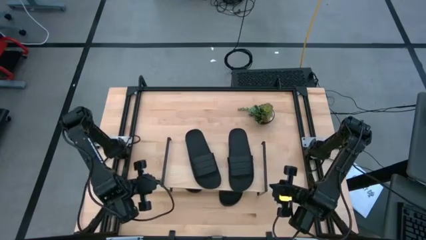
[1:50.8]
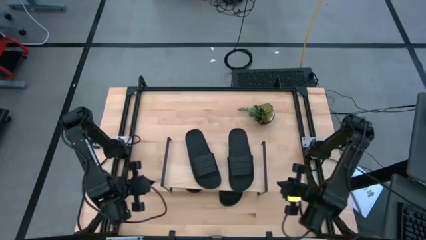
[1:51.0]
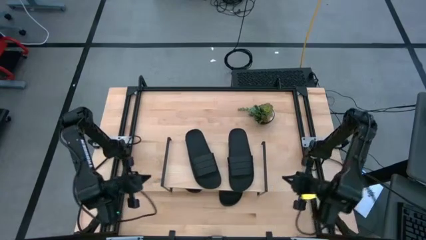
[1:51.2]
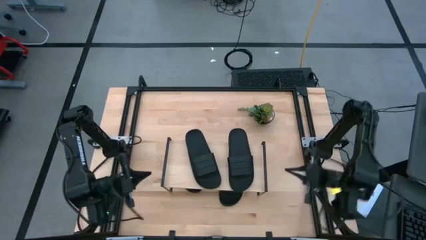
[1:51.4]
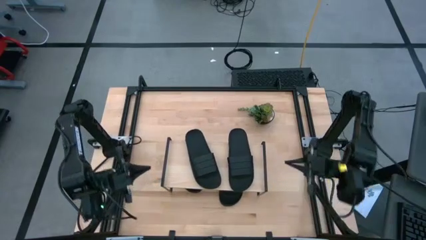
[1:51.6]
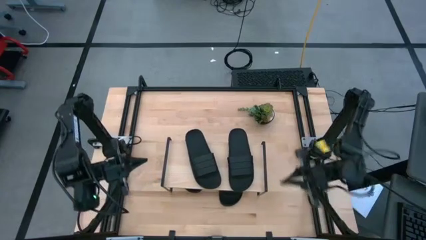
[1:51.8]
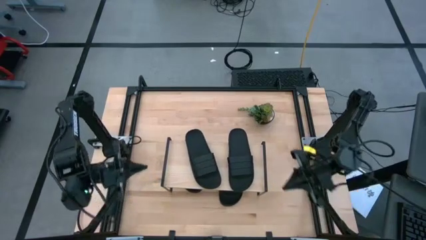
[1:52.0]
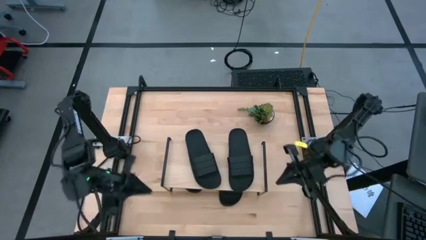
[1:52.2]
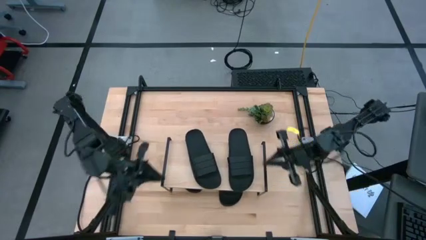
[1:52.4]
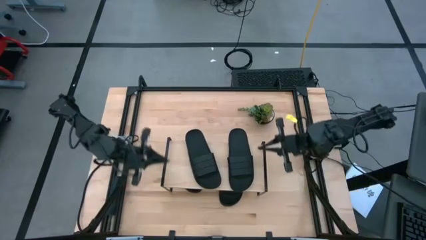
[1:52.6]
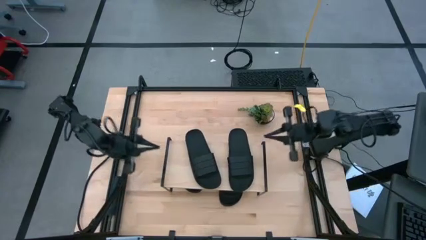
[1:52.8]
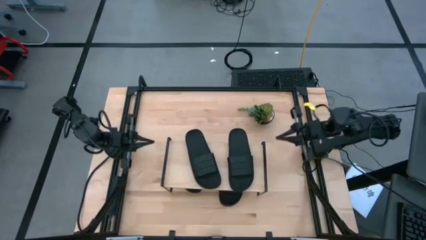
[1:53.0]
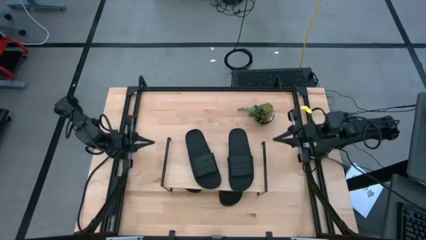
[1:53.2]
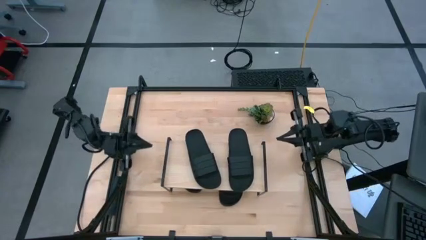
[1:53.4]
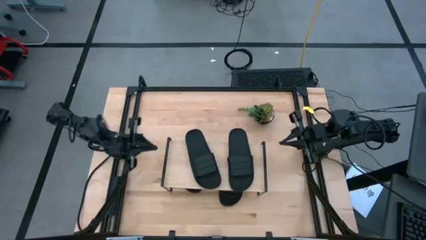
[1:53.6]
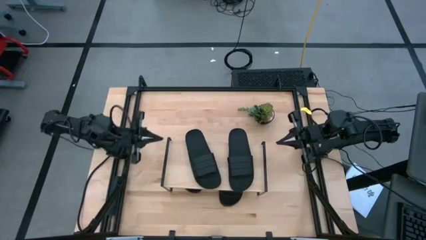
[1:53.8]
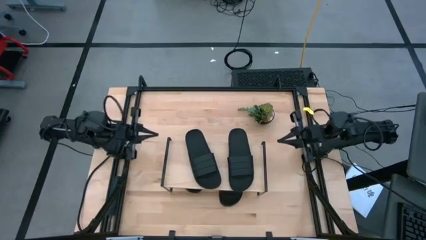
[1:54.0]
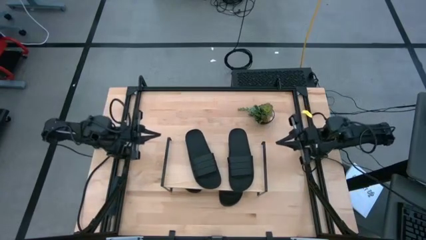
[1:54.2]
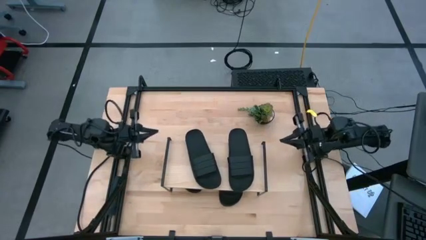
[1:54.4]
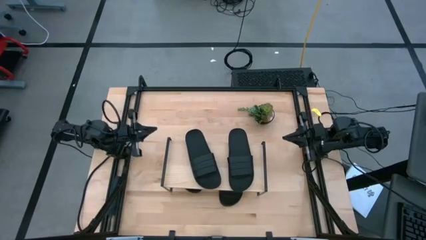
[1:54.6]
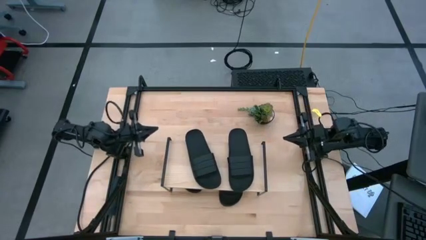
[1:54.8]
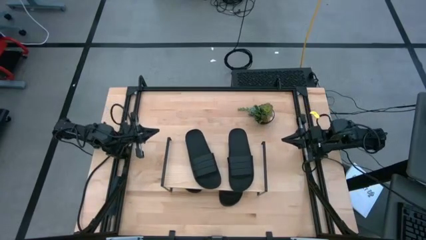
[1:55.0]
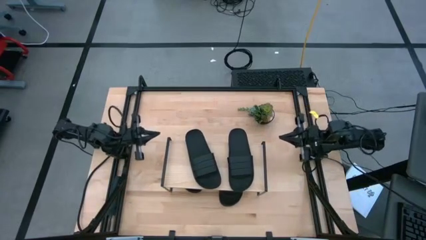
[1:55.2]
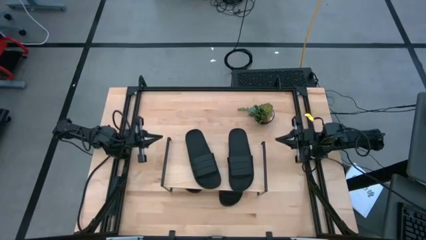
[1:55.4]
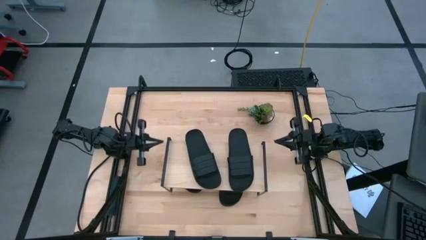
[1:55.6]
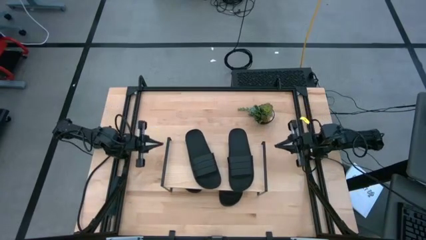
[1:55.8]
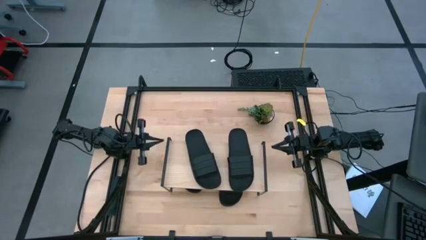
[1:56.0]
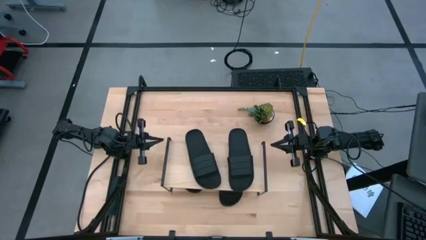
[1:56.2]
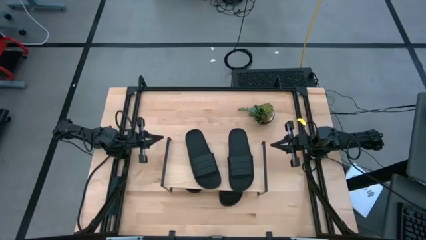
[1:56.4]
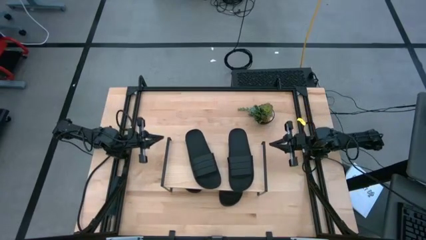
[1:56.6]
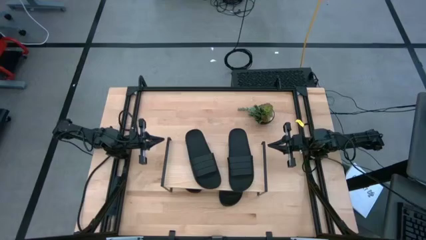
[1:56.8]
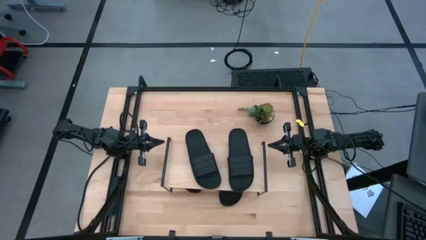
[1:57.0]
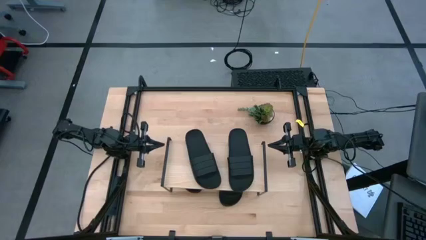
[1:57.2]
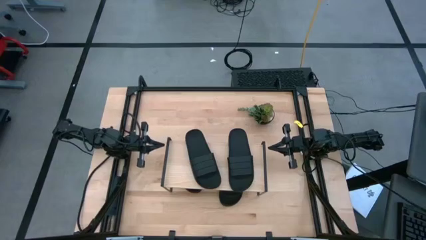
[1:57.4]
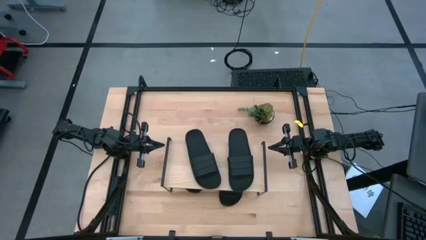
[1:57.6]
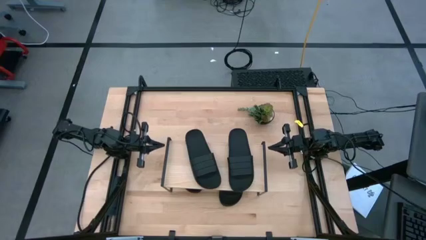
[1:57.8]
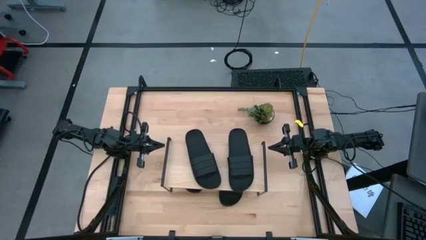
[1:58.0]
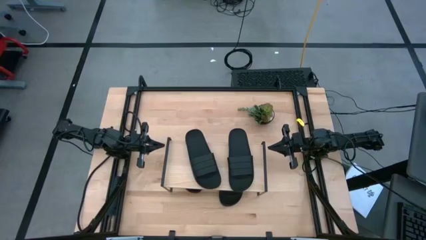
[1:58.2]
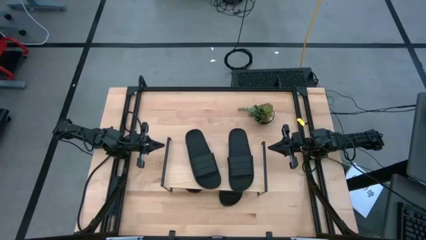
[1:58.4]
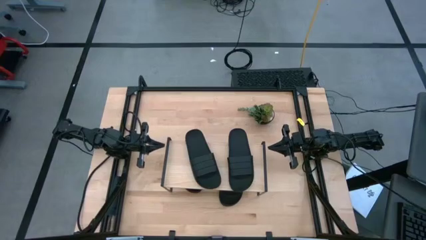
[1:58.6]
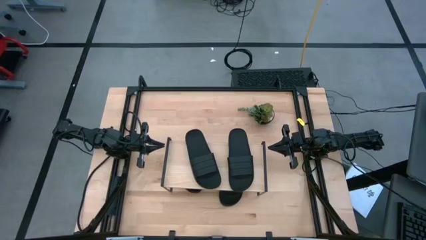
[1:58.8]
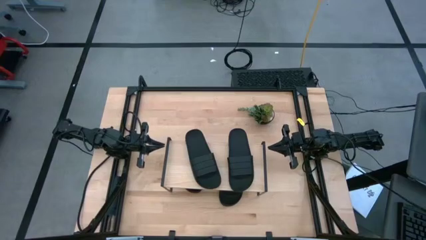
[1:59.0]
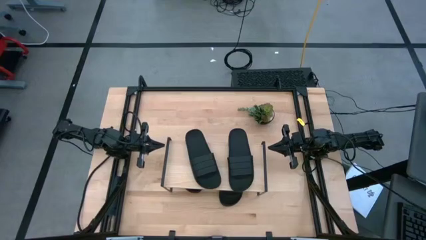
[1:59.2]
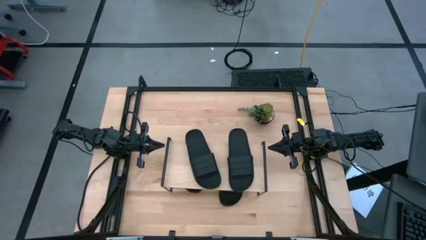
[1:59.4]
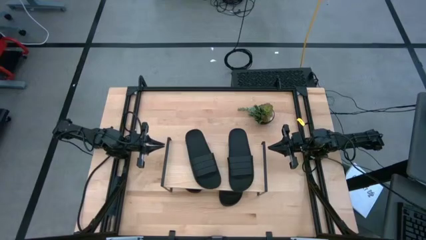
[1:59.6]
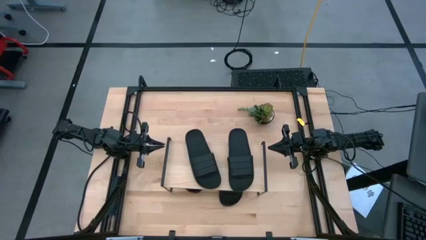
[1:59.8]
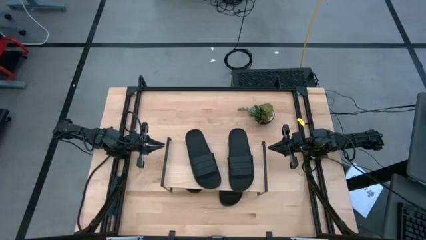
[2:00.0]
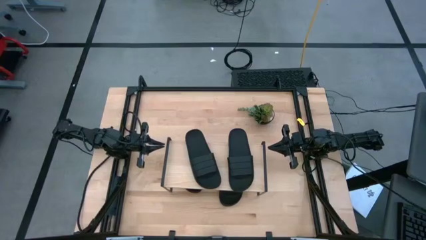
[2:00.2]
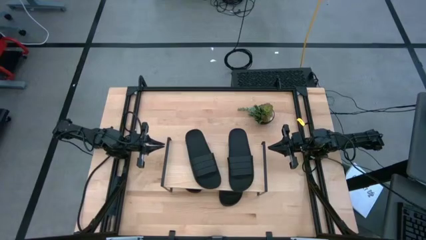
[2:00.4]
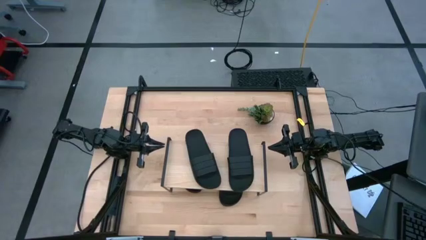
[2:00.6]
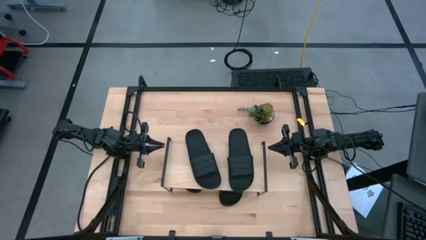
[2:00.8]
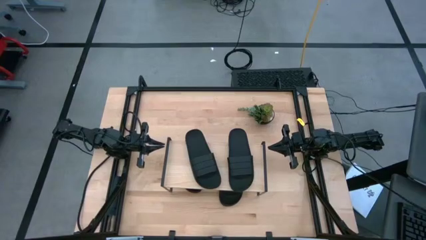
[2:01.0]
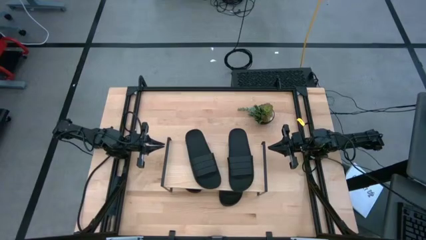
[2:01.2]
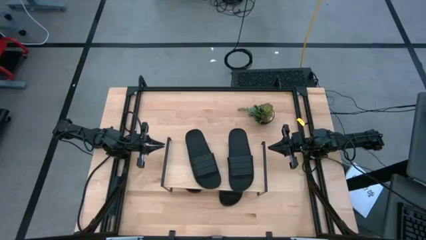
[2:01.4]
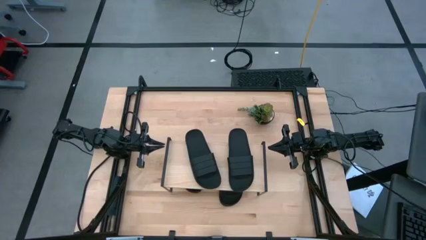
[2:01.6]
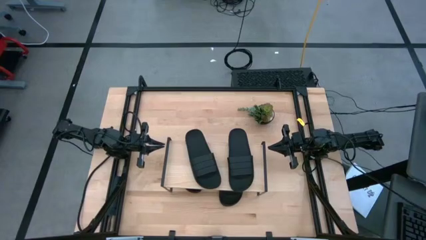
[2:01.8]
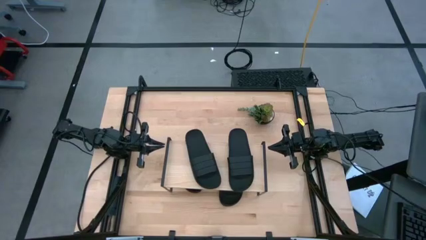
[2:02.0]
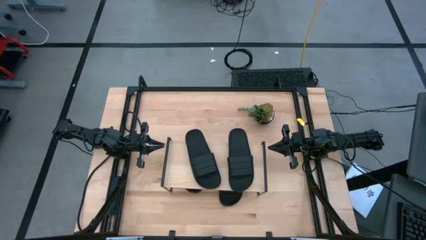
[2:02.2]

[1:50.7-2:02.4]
Task: Pick and place slides into the shelf
Return to Home Position

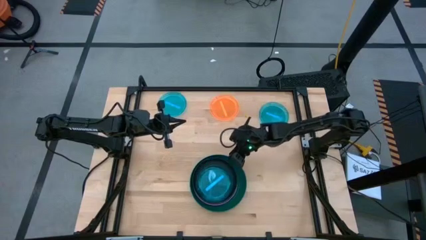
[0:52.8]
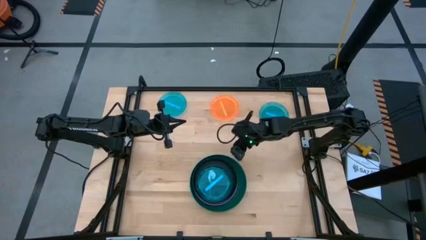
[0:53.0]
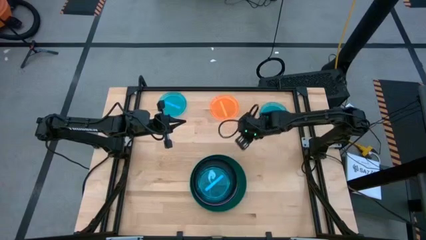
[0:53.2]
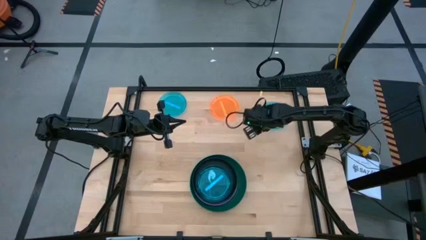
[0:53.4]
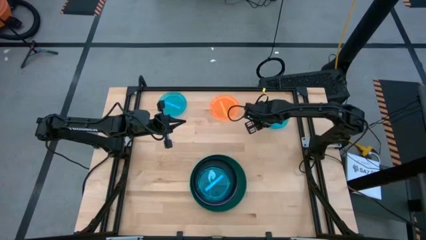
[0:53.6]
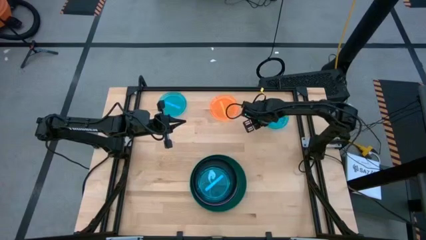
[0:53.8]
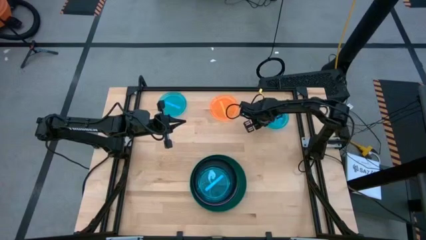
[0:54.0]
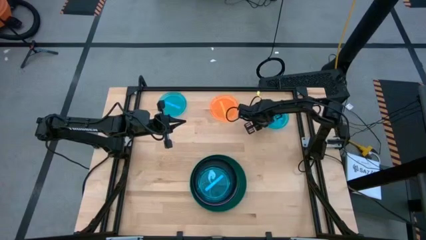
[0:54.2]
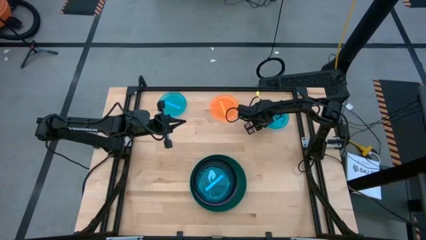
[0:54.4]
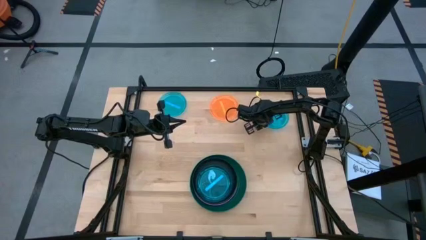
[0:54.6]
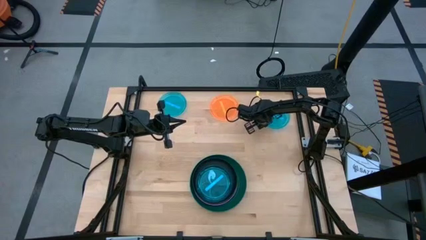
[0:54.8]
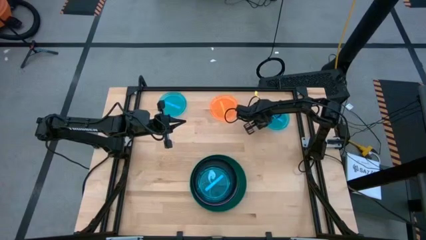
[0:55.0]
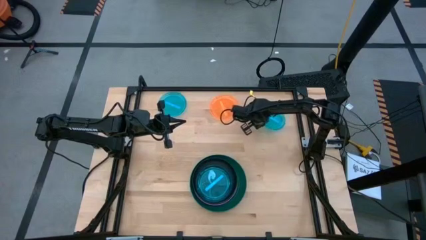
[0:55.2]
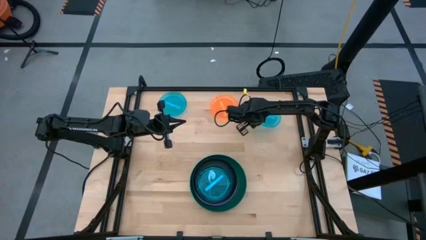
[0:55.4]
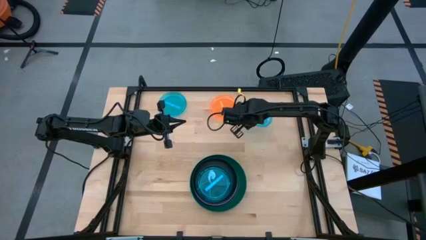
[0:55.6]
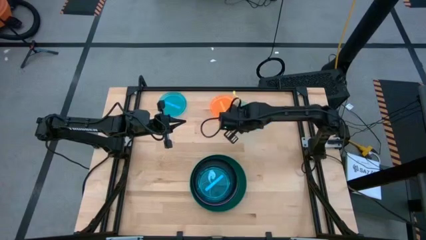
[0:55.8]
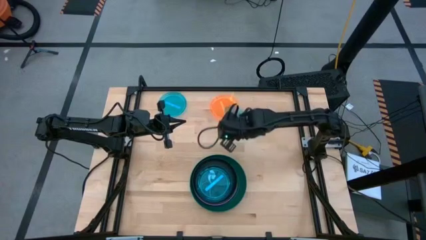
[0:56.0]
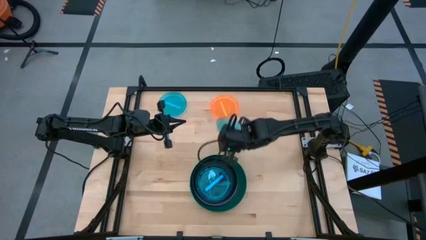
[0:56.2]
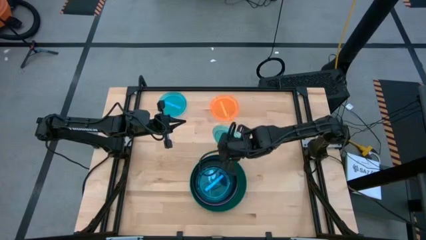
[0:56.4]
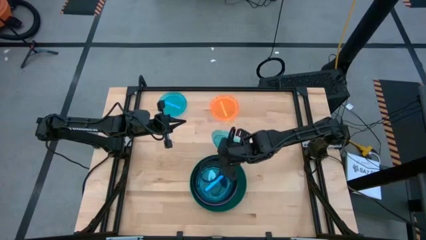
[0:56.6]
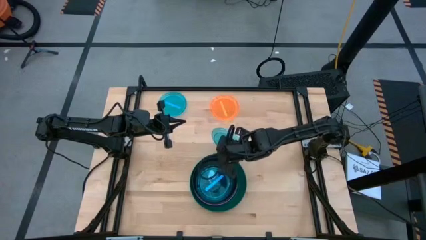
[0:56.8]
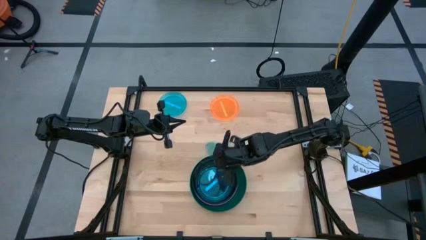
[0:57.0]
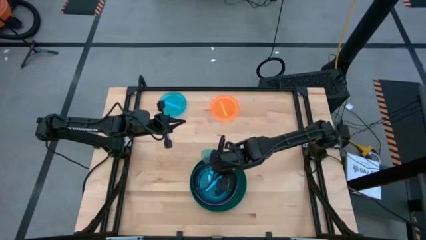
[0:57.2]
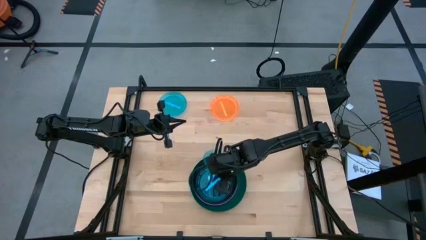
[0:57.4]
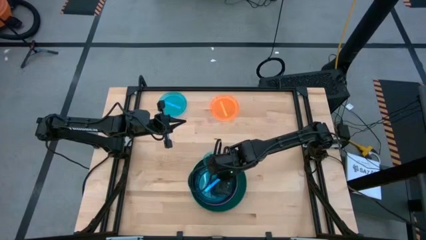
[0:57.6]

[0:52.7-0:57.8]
Task: Stack plastic plates
Stack the right blue plate on top of the blue plate
